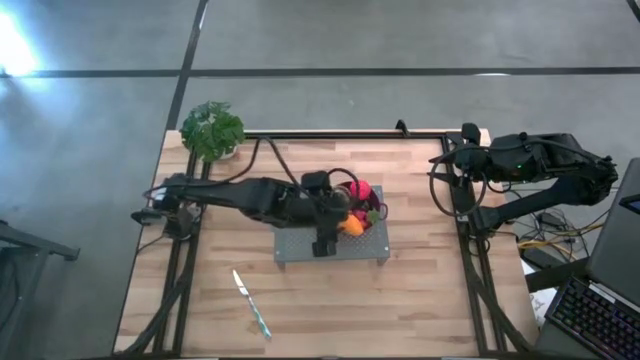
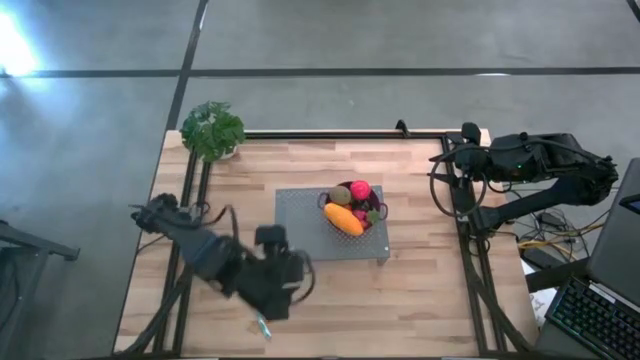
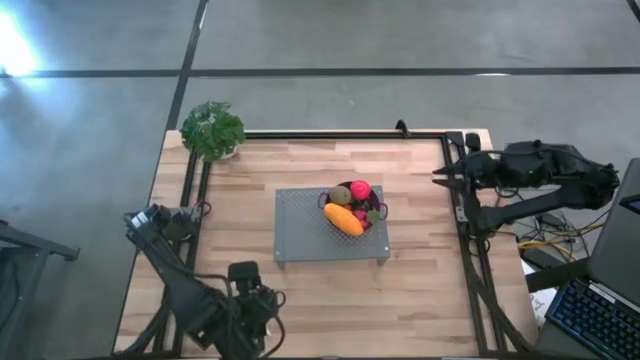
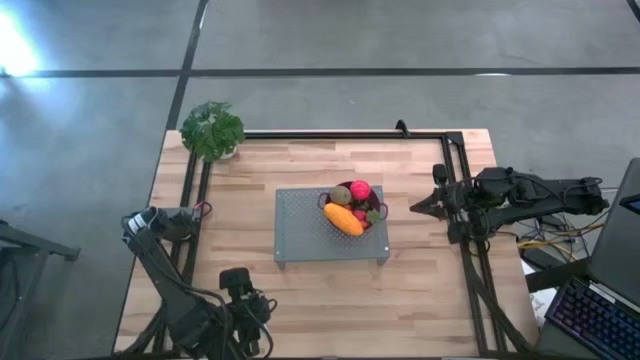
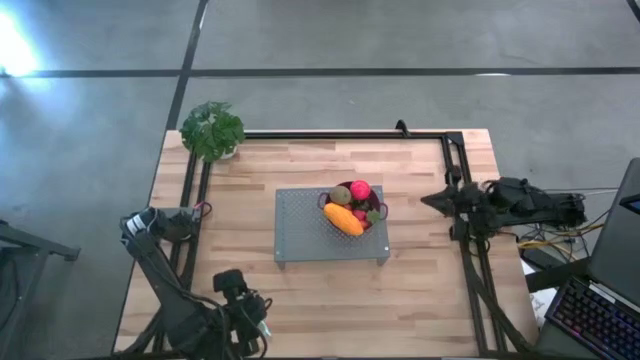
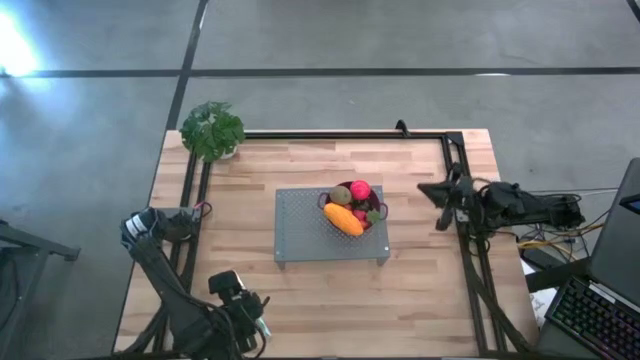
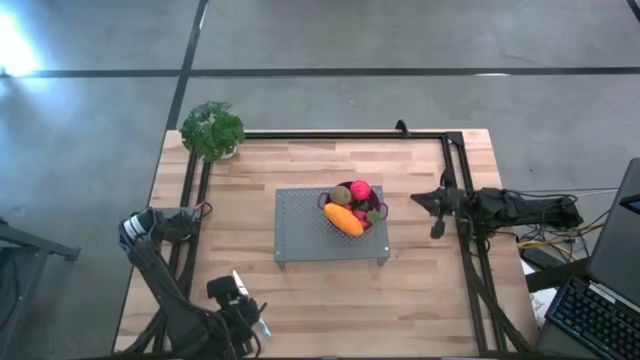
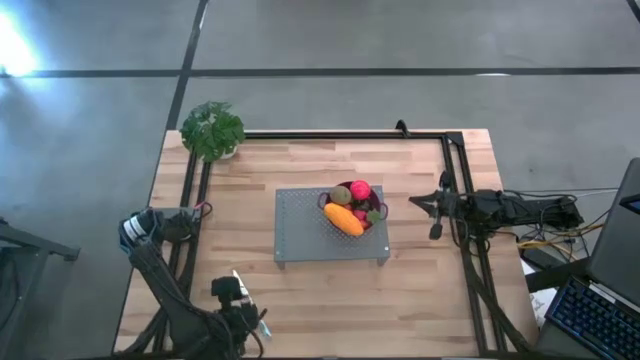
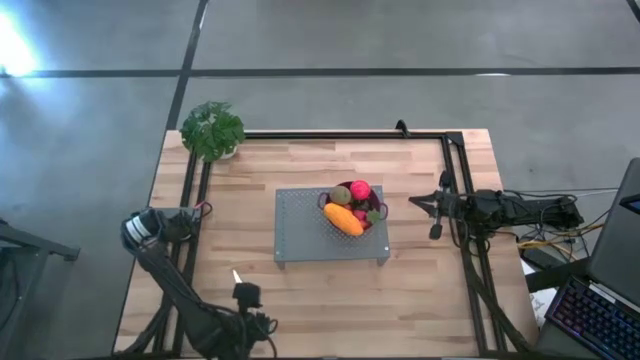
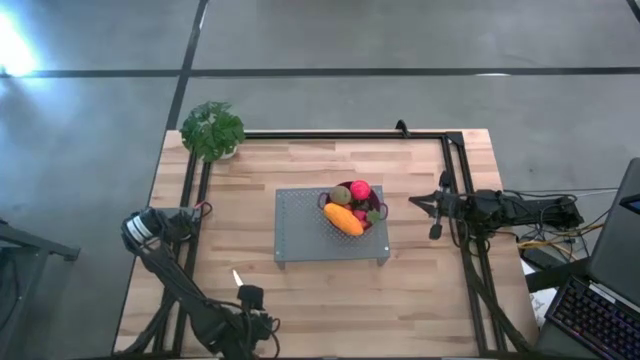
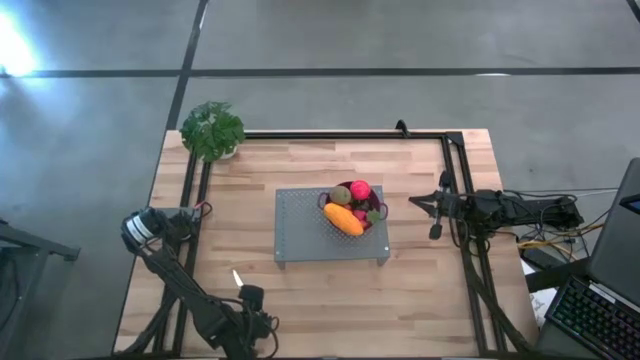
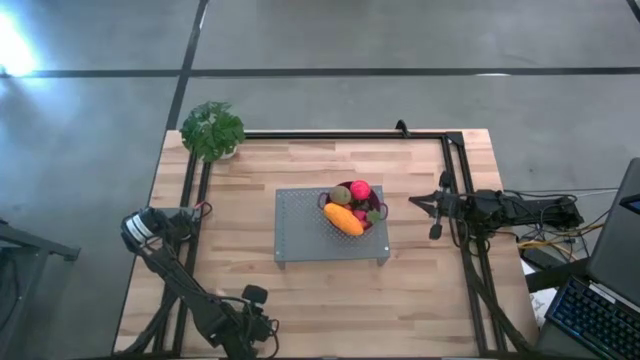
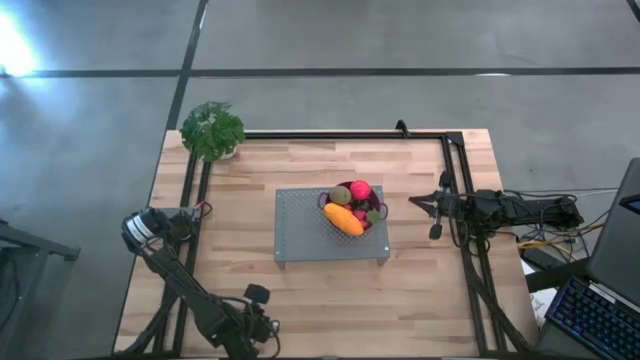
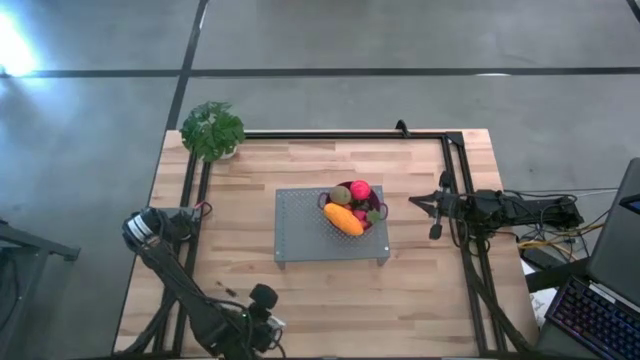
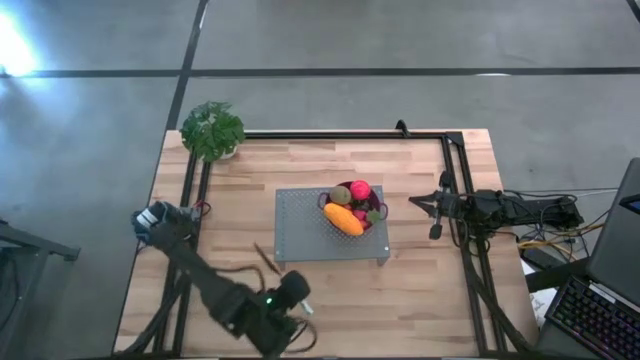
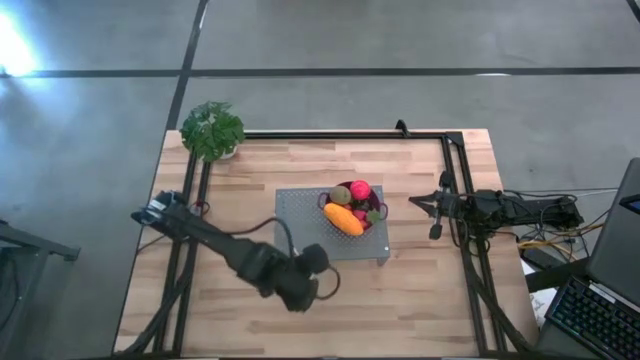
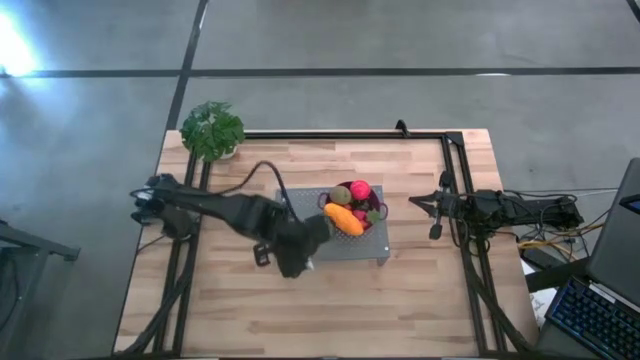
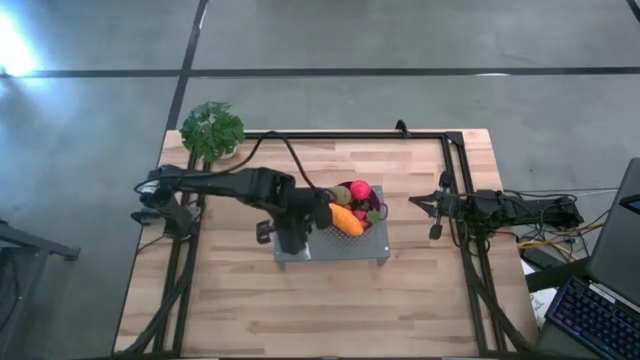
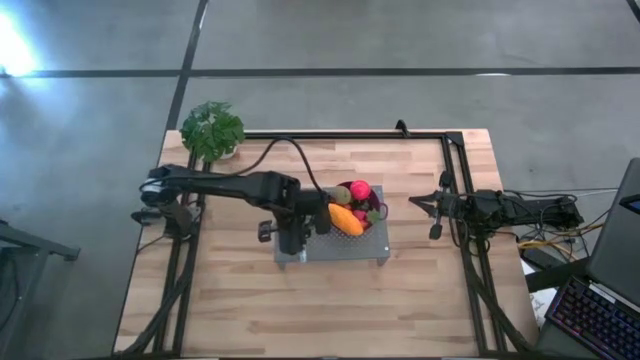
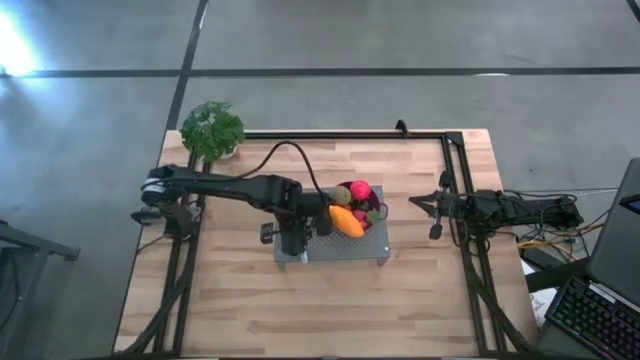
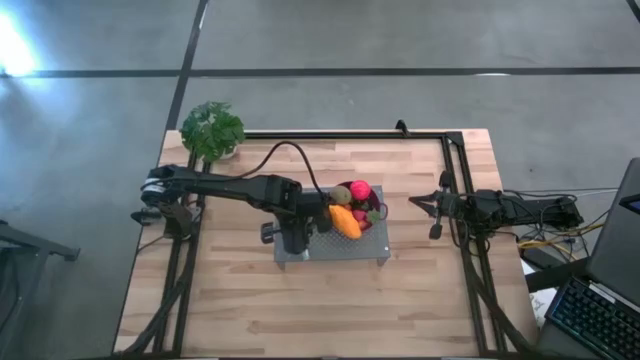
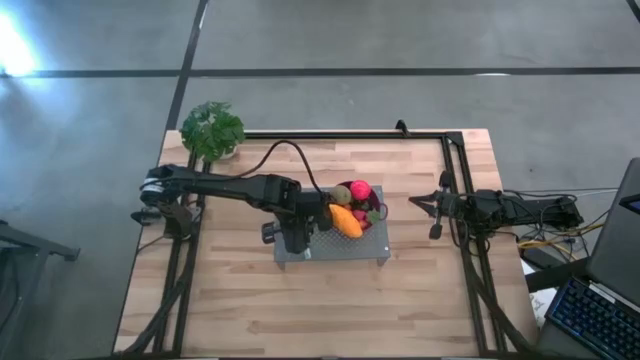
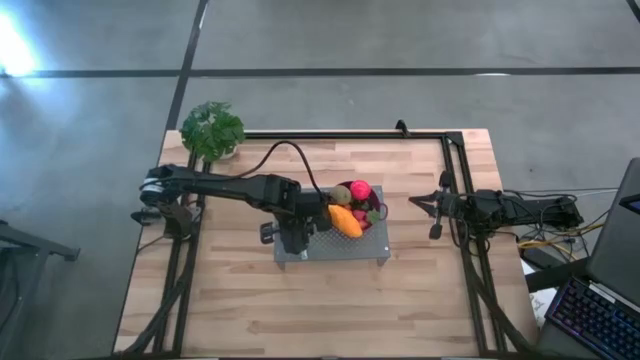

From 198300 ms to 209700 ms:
Task: Pick & Place Fruit
Put the blue knife on the shelf

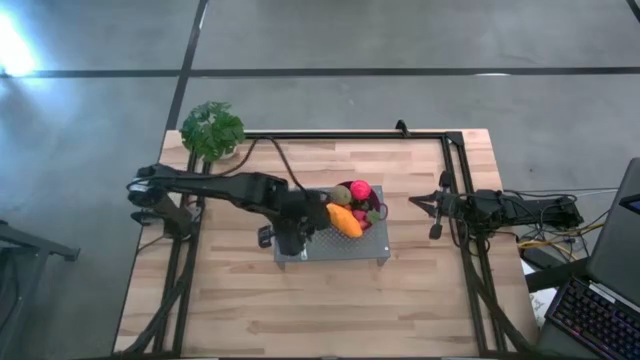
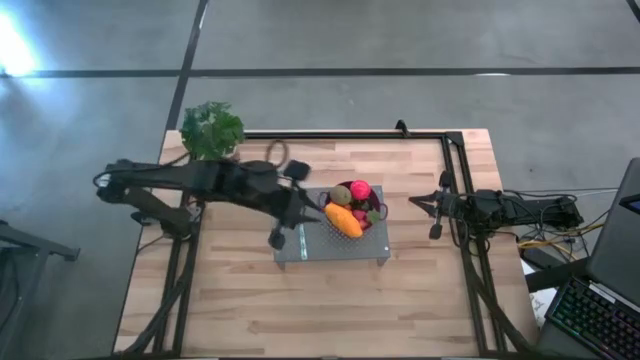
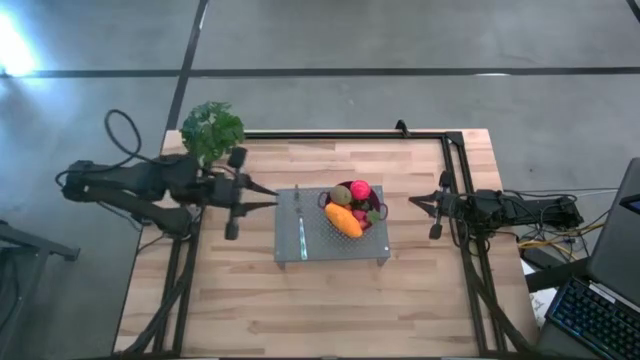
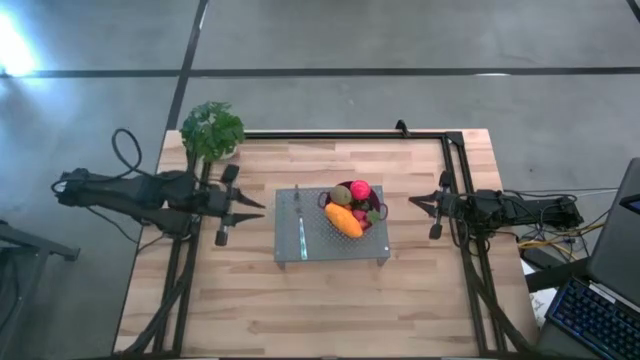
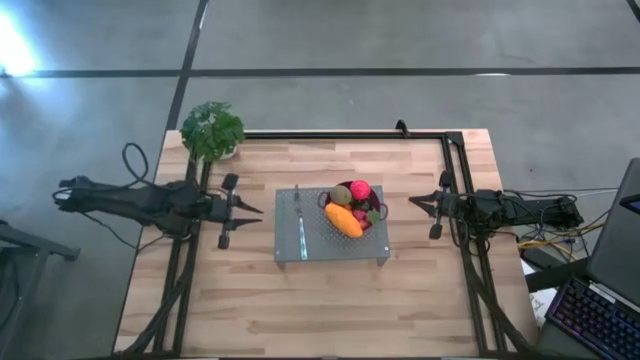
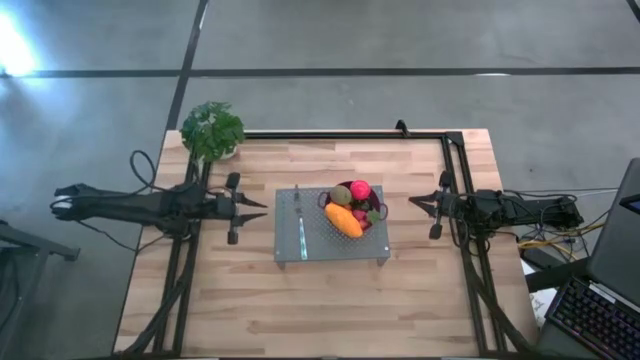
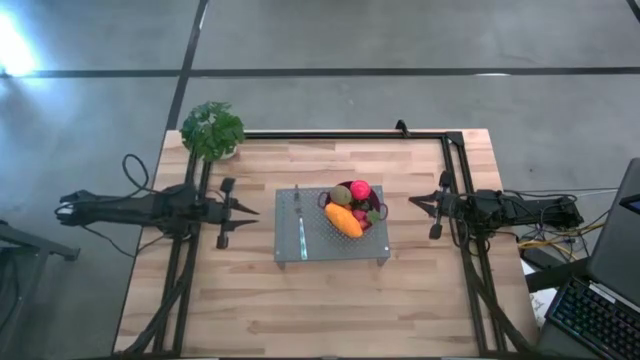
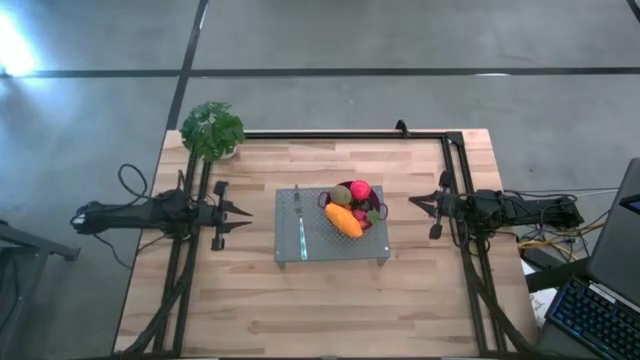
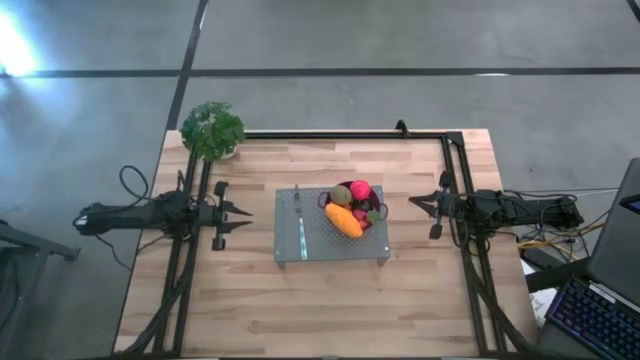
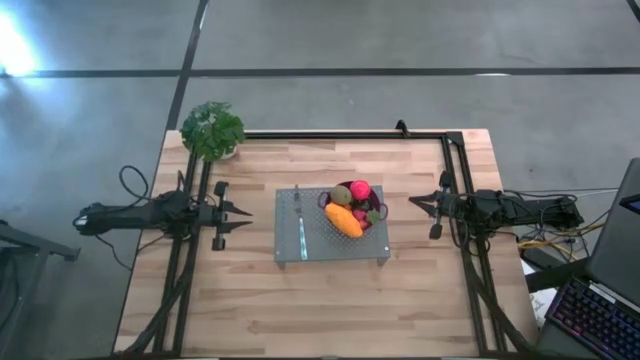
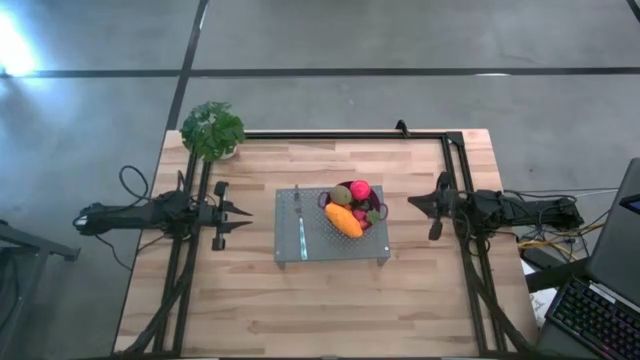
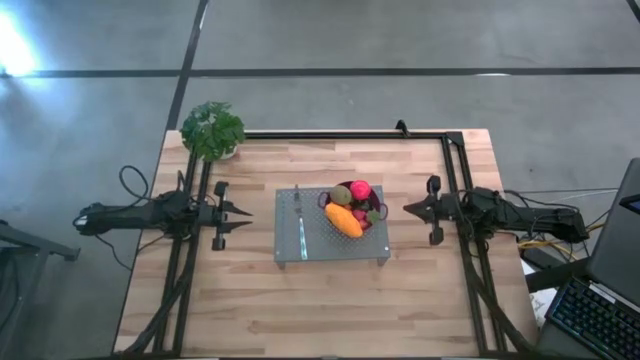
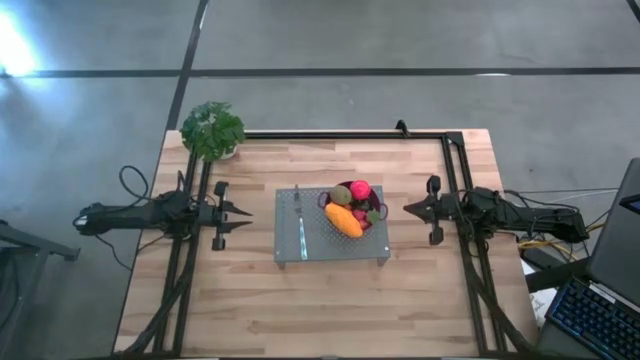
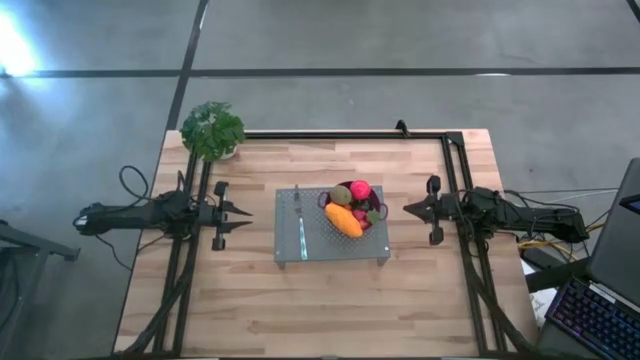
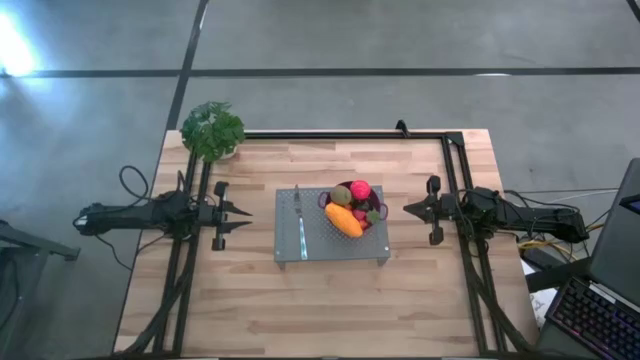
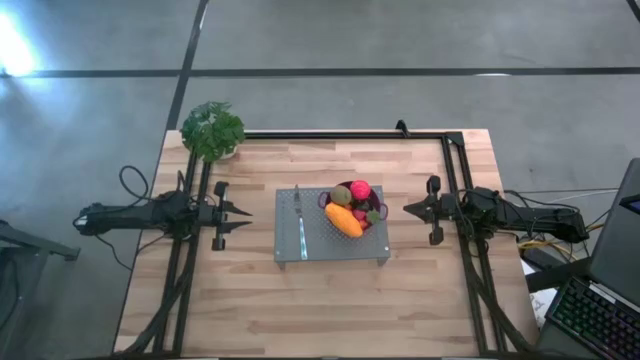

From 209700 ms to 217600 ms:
Return to Home Position
